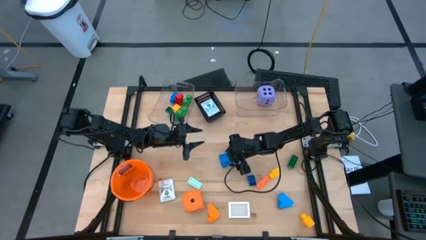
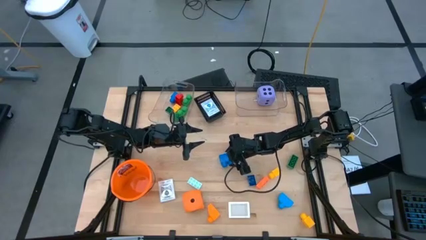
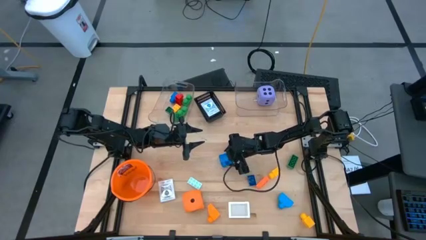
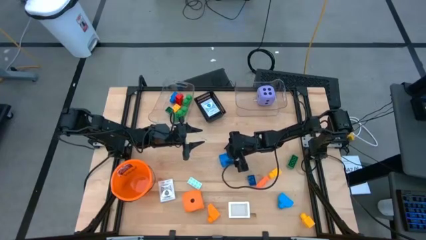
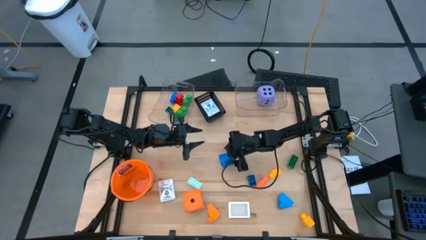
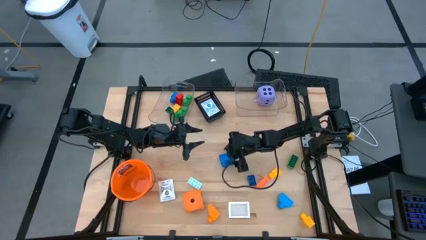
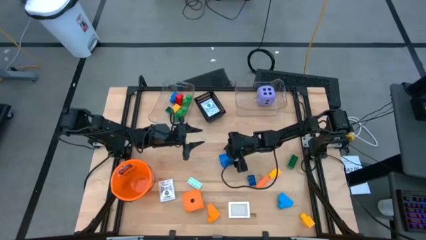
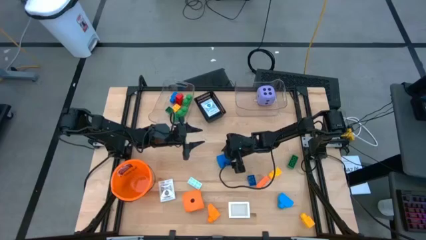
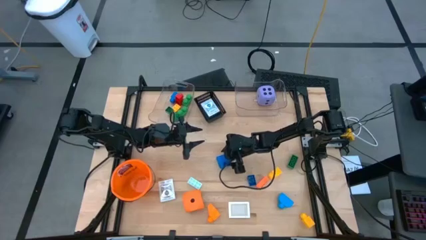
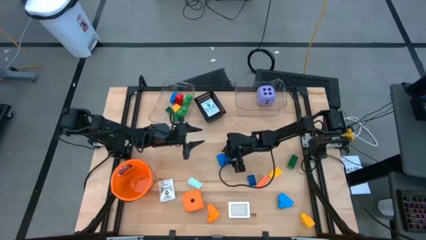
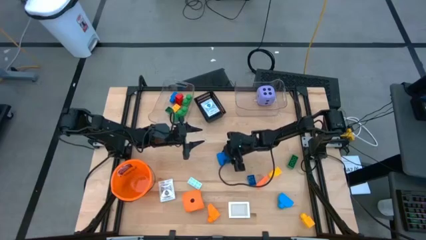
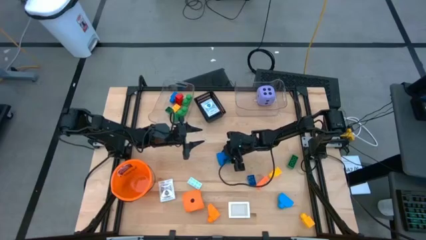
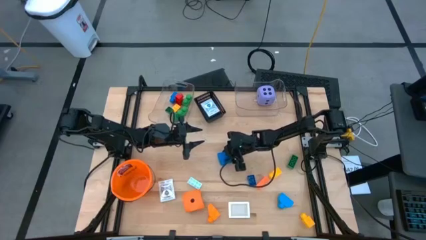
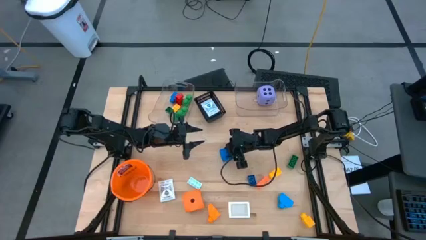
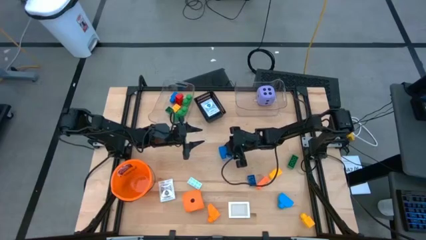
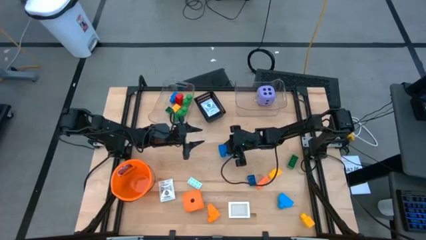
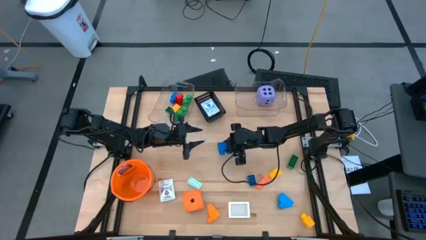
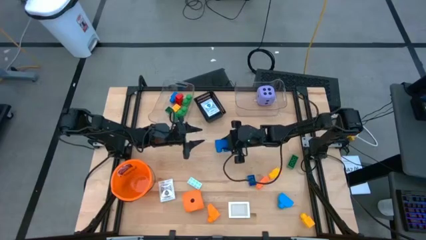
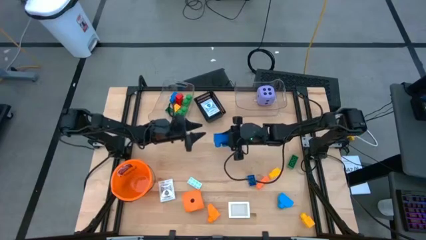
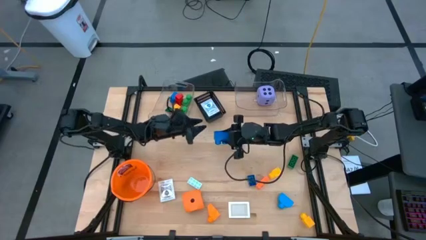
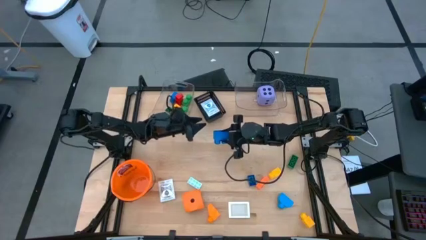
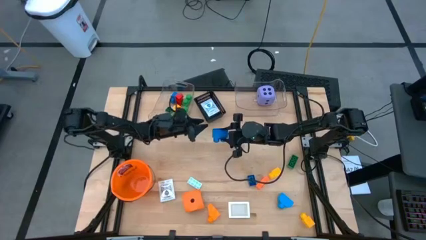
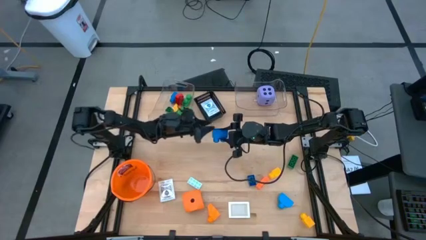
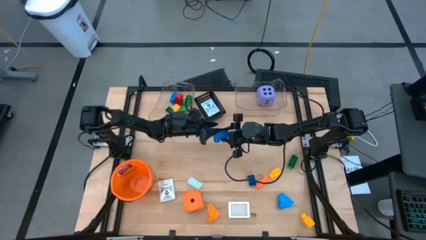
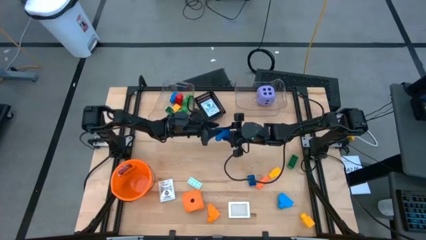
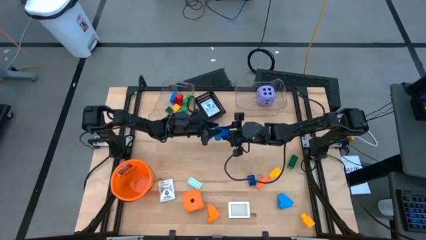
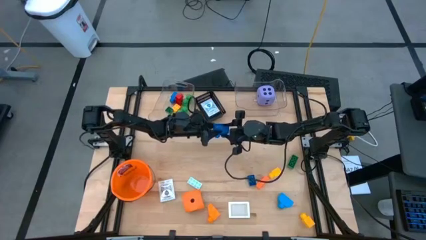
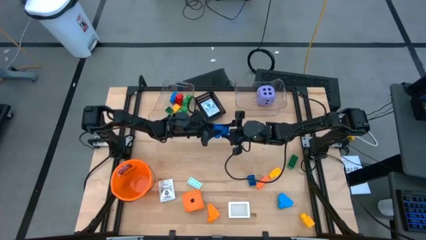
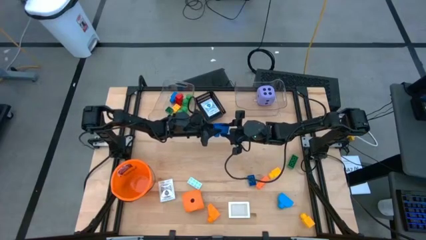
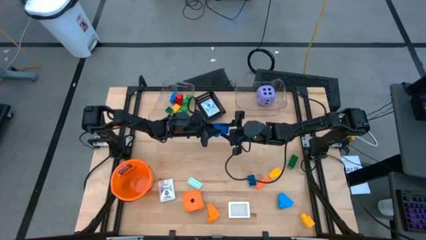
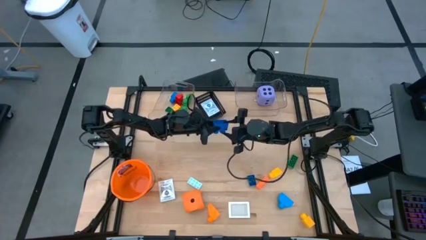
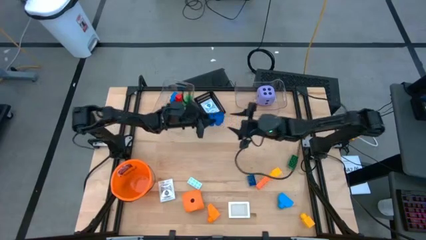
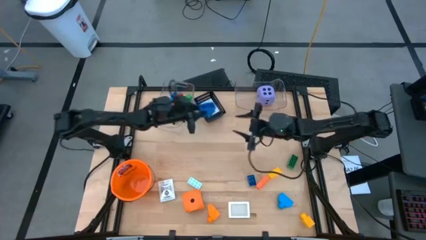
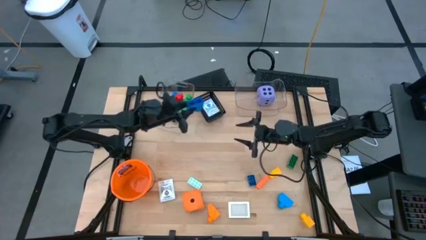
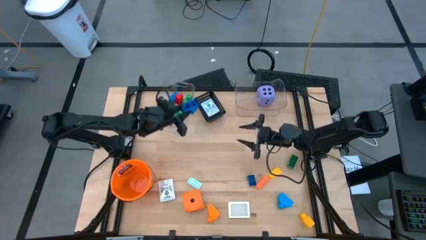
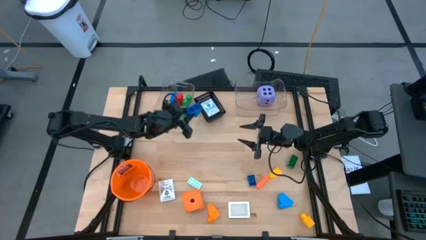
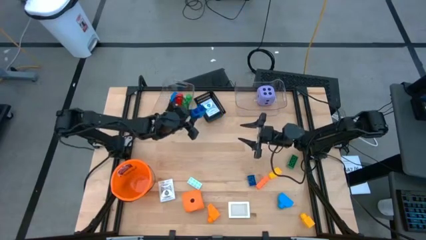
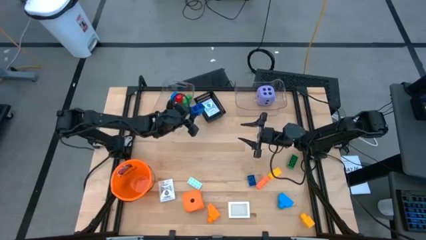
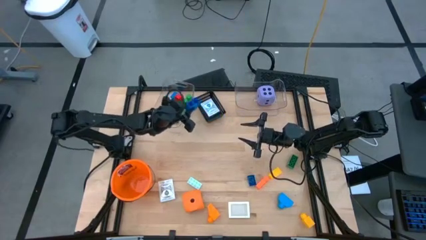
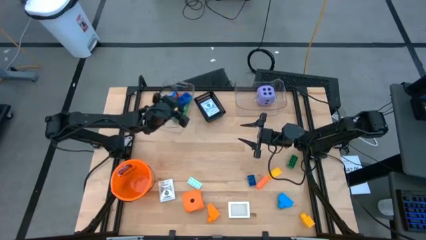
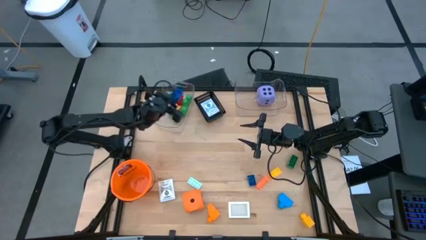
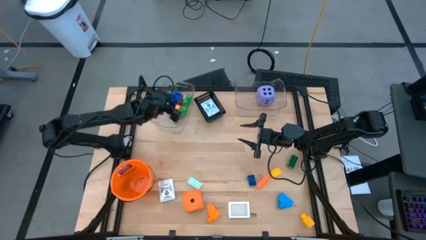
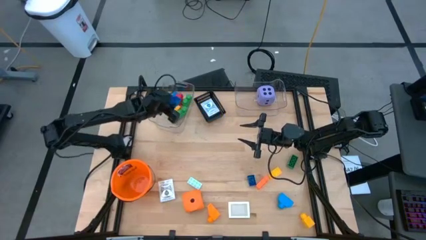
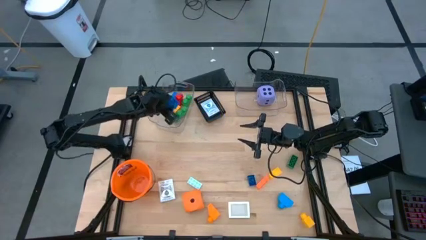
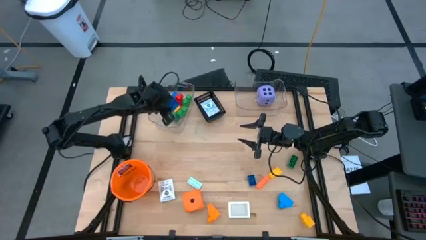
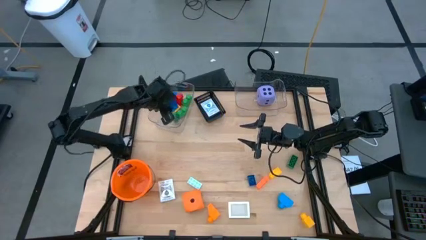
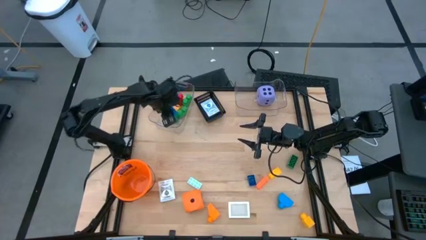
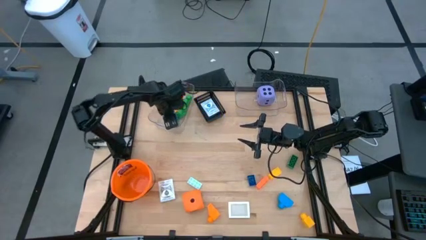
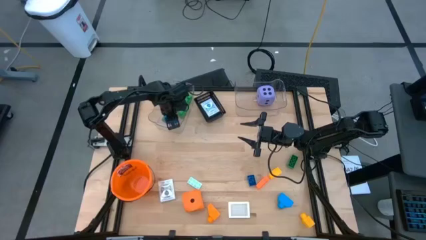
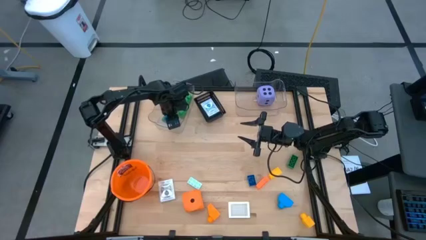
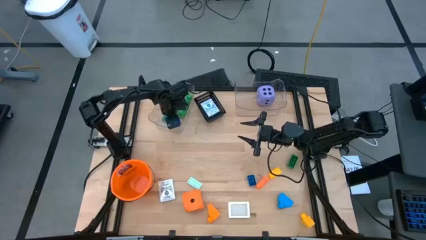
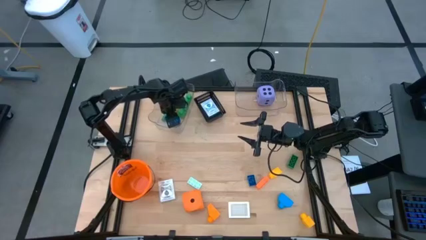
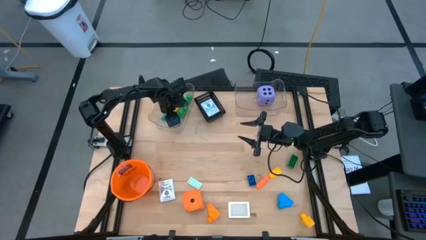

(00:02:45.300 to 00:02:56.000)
Task: Pick & Place Toys
Put the blue gamepiece into the left transparent bin

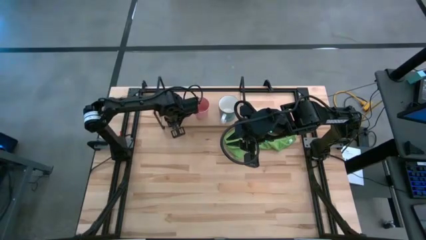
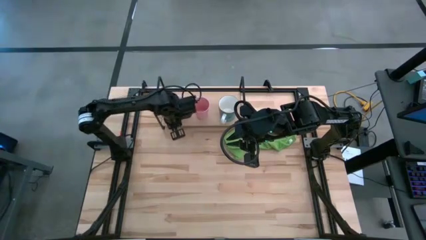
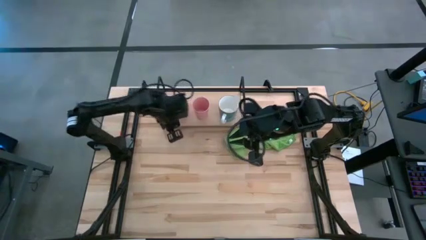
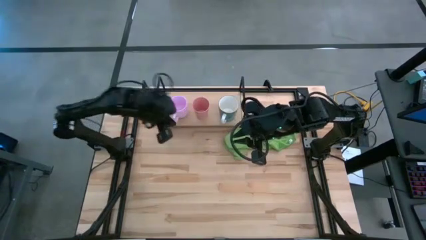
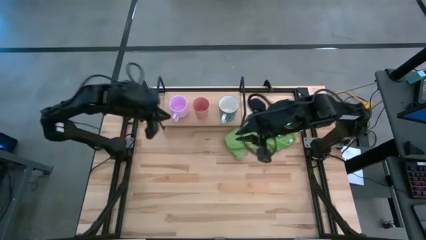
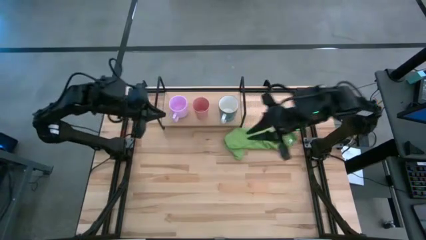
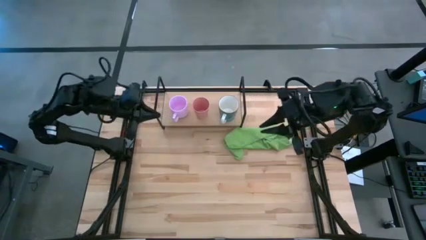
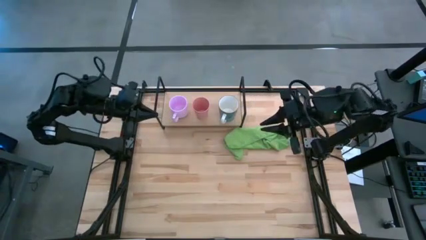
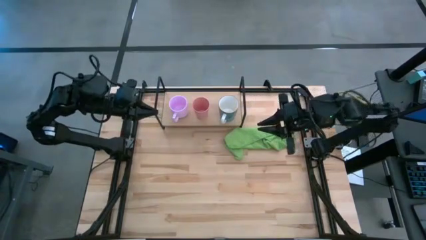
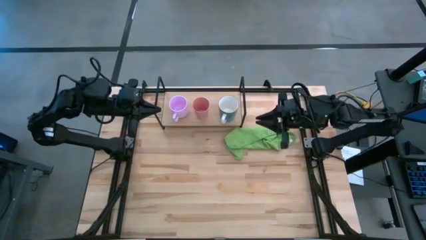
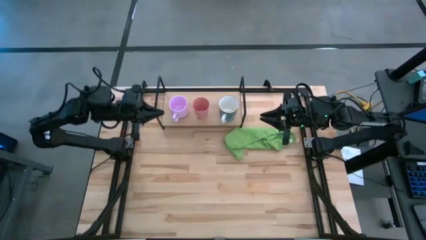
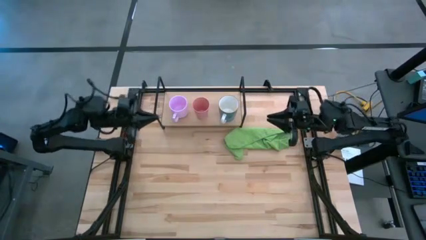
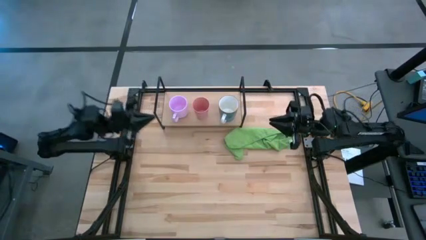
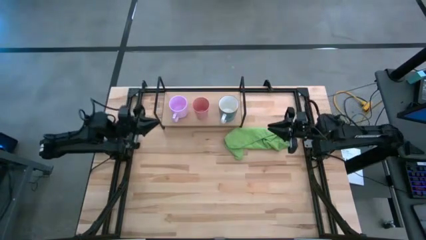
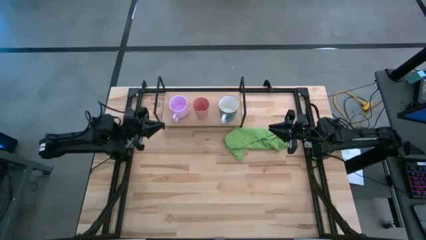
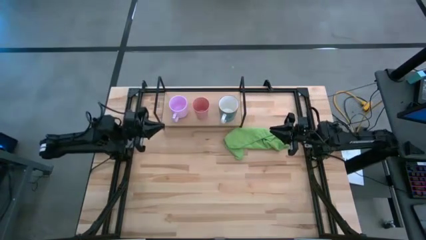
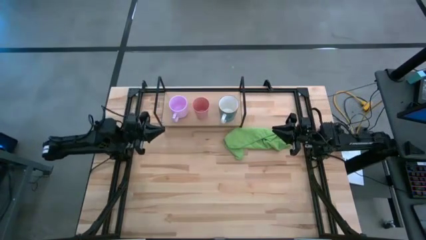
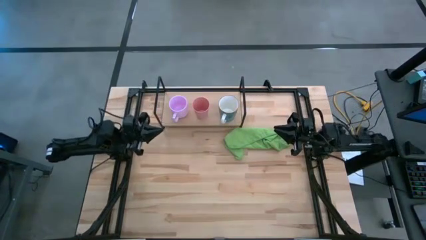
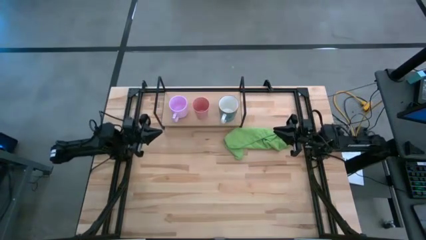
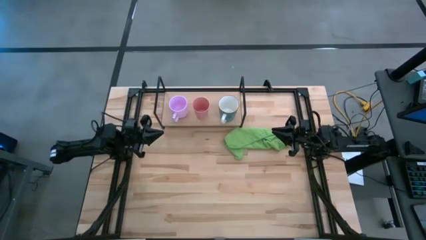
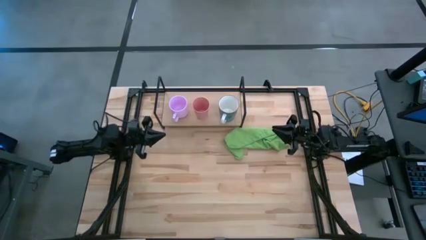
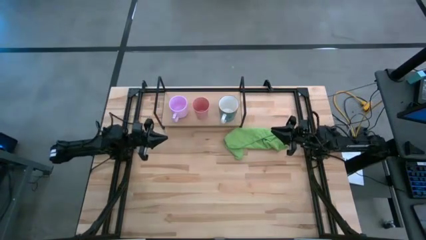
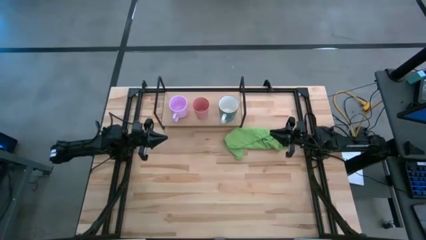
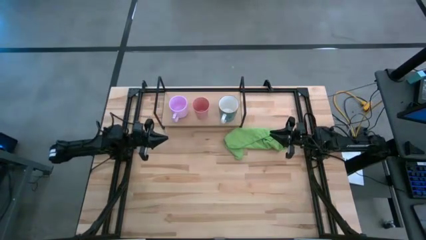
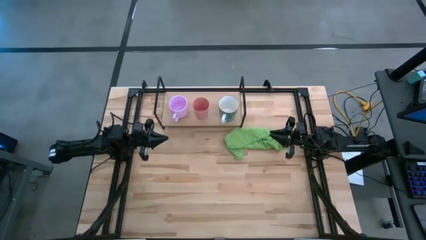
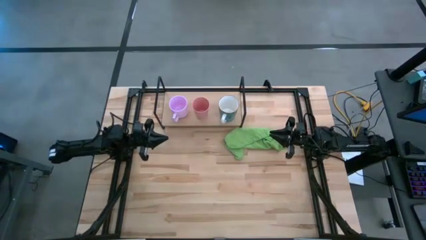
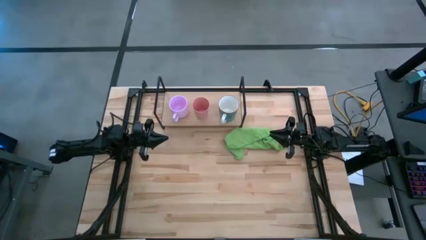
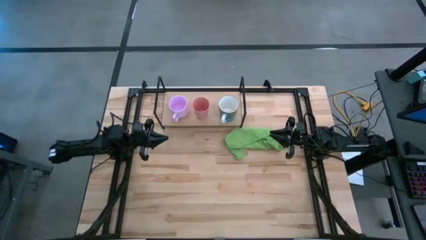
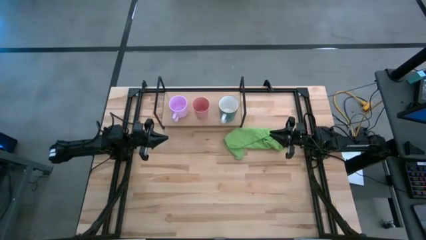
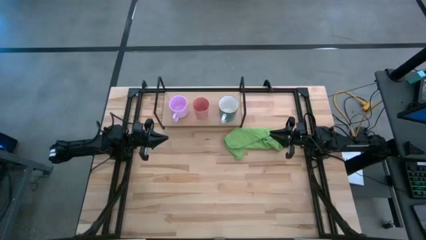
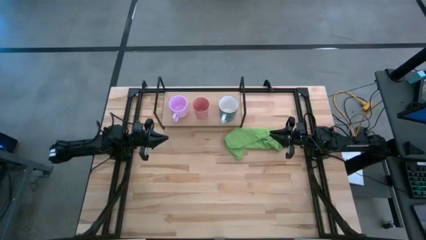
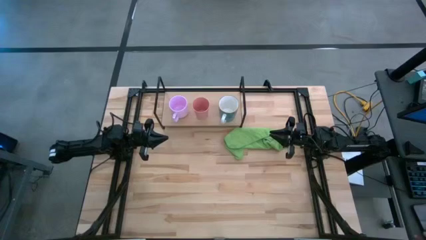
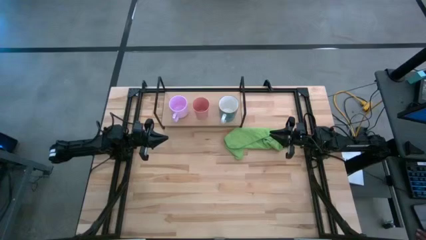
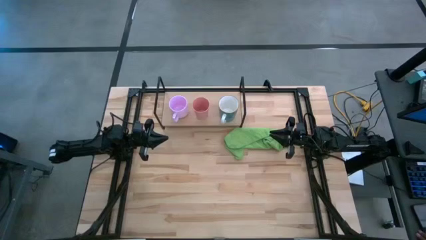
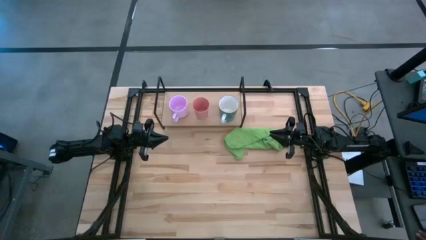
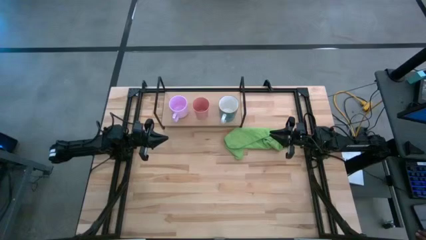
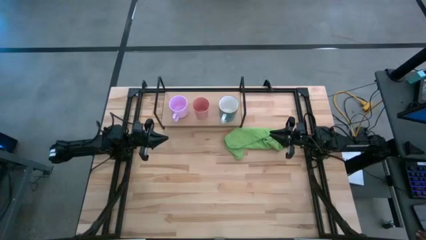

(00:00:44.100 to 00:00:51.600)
Task: Stack small to large cups/mugs on shelf
Return to Home Position
